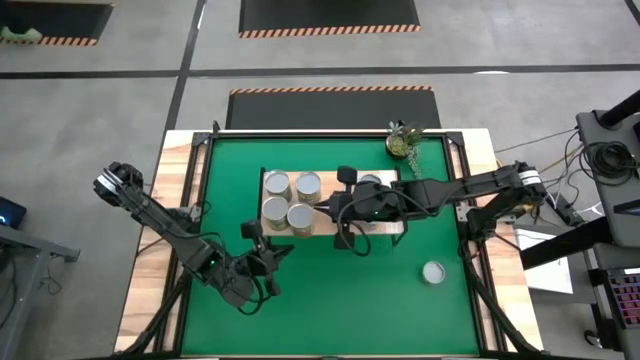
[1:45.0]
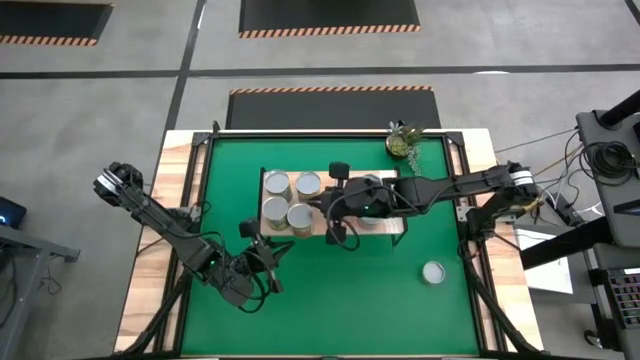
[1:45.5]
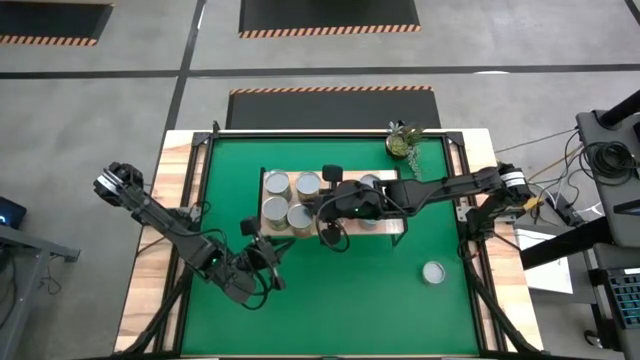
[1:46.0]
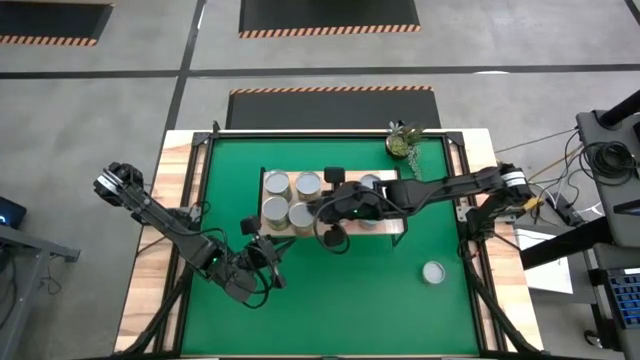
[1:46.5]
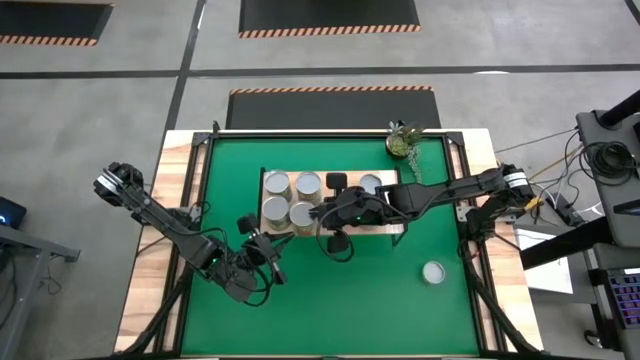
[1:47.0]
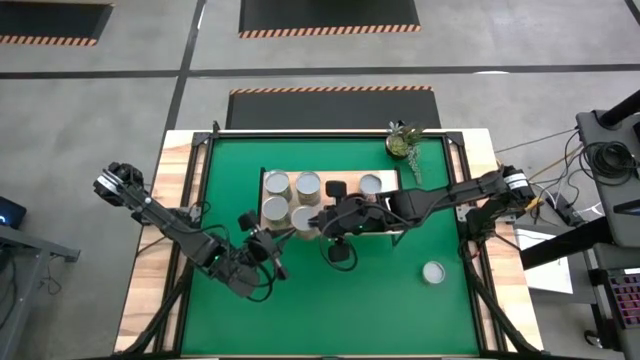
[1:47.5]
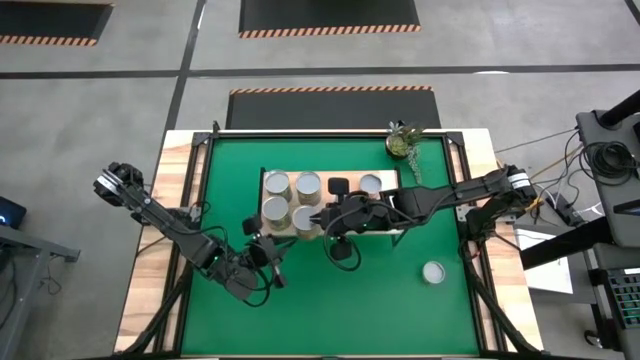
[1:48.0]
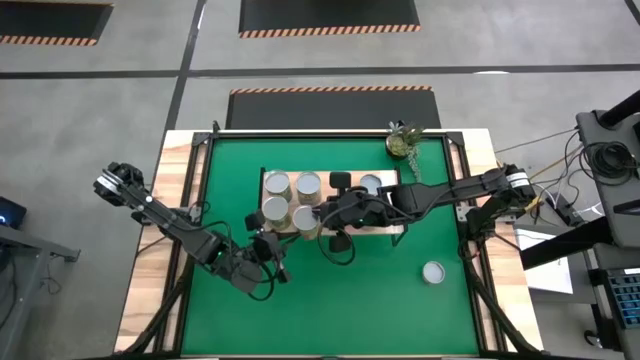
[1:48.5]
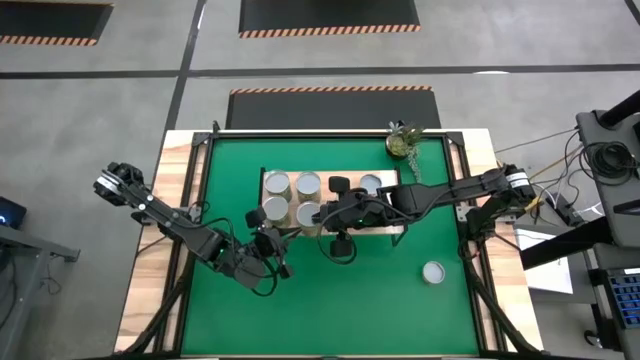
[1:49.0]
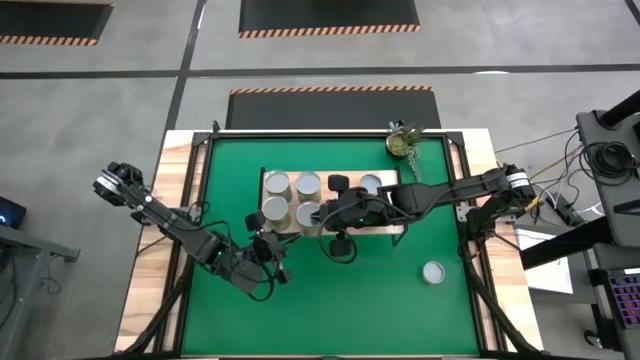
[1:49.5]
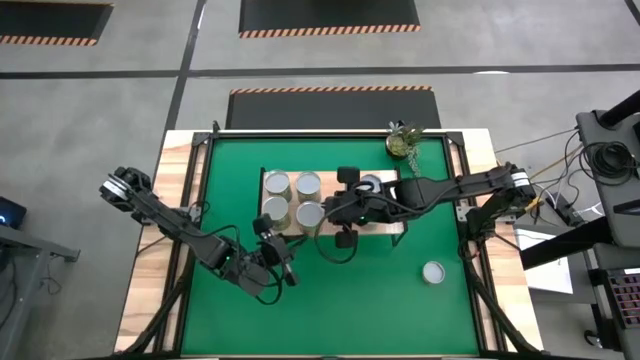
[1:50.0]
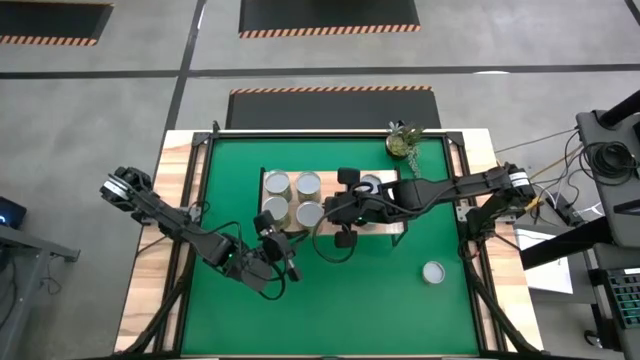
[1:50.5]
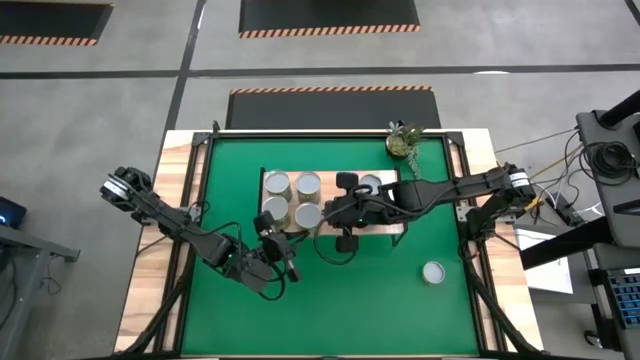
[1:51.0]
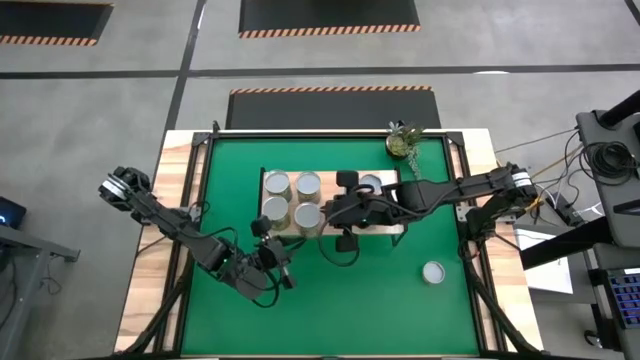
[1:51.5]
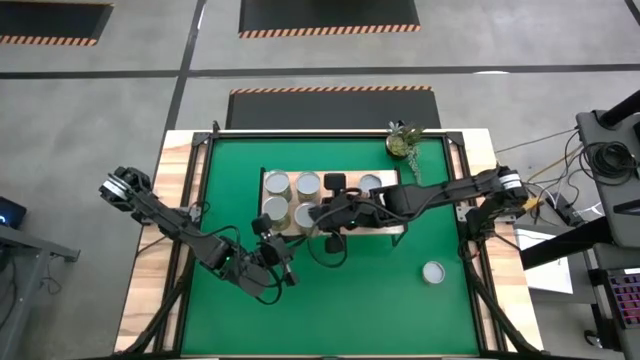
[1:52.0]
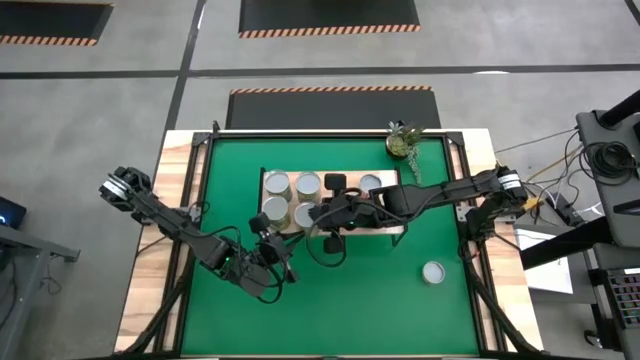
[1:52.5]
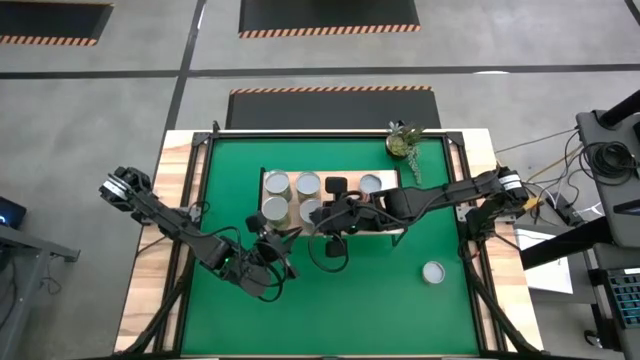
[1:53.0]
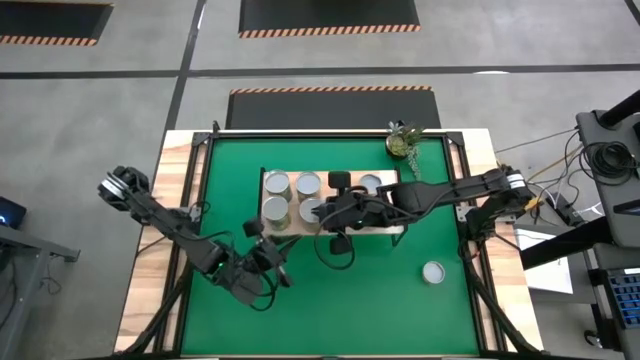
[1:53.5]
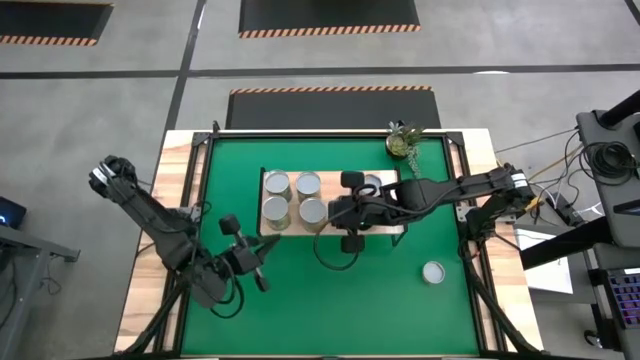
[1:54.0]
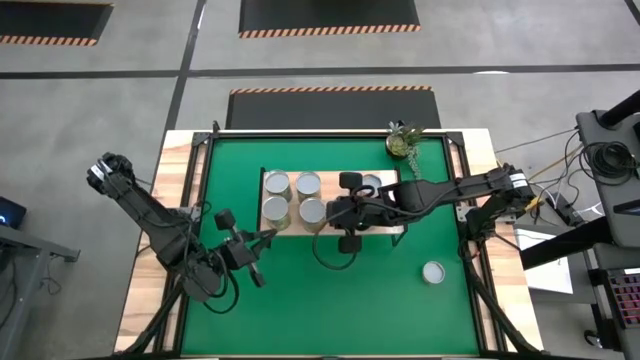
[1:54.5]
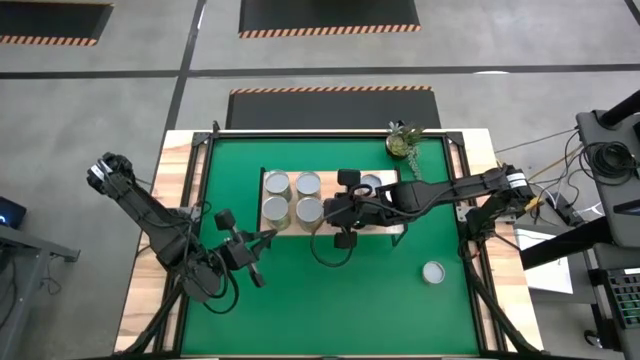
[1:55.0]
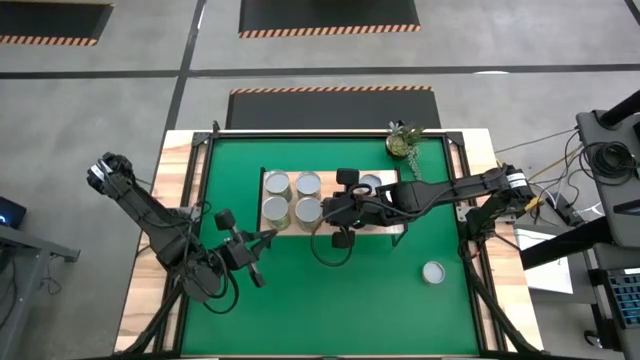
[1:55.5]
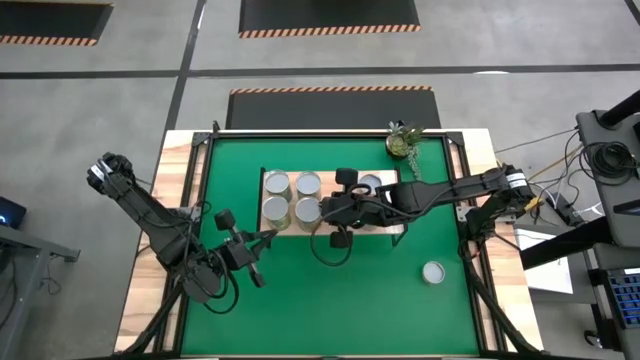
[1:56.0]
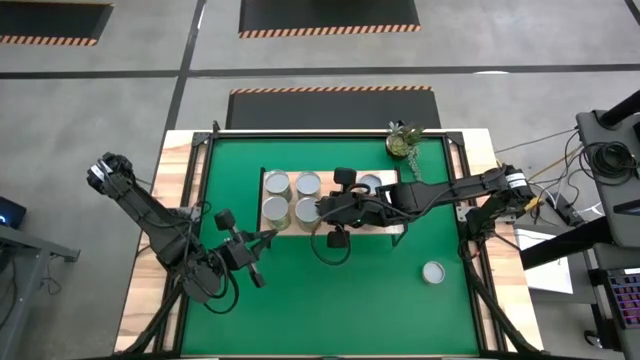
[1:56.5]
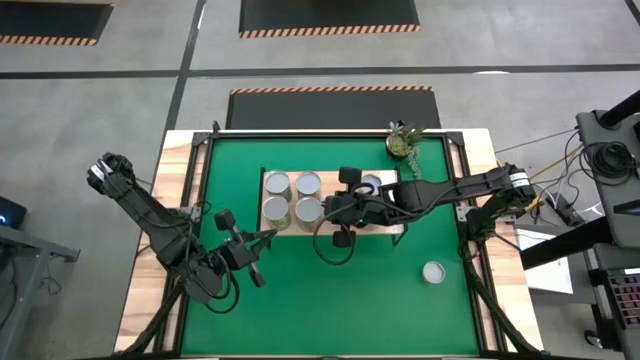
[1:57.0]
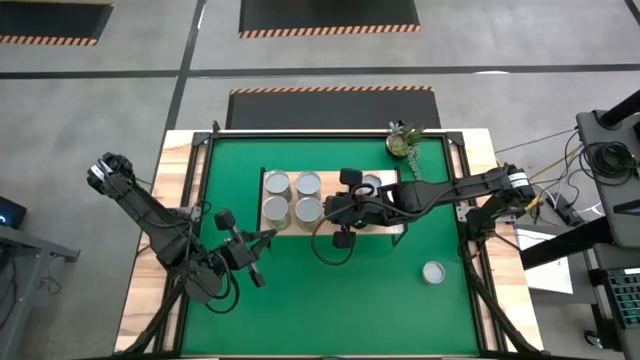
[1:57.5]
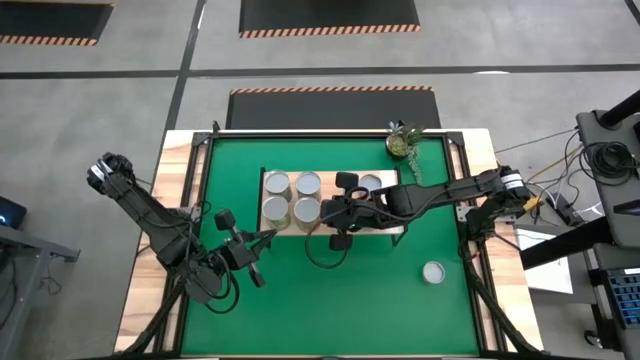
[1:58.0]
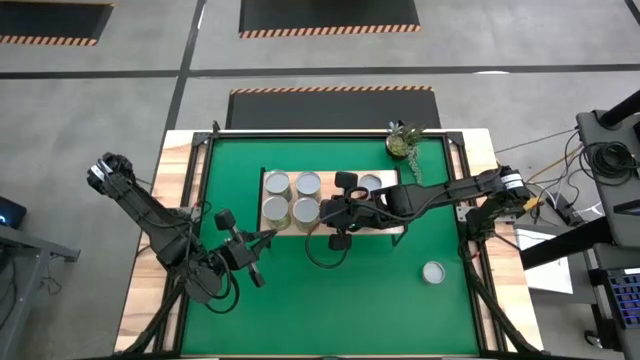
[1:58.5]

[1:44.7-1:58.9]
Task: Pick and place cans onto a shelf
Put the canned pineapple on the shelf

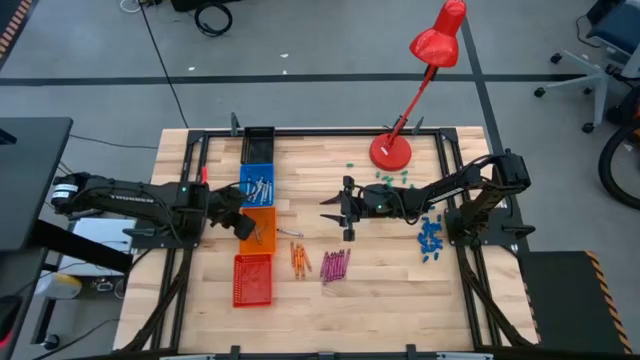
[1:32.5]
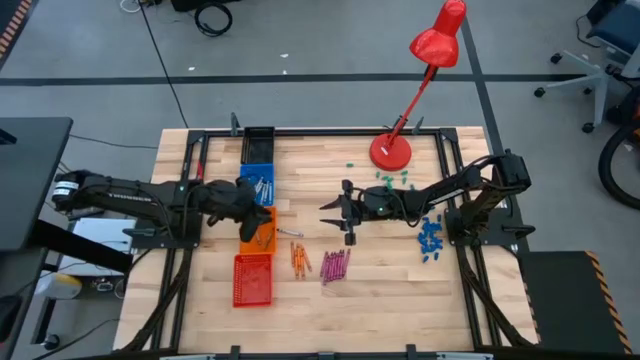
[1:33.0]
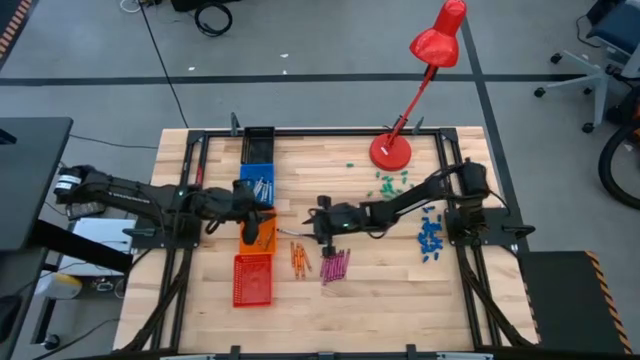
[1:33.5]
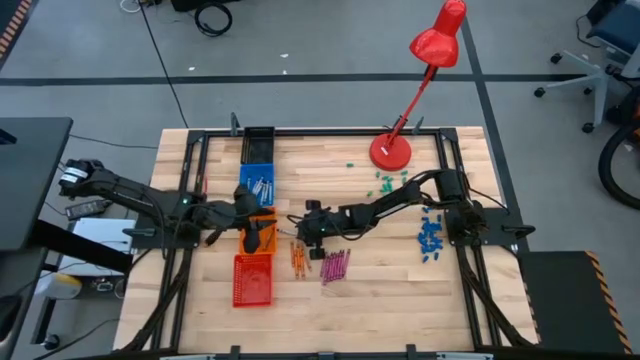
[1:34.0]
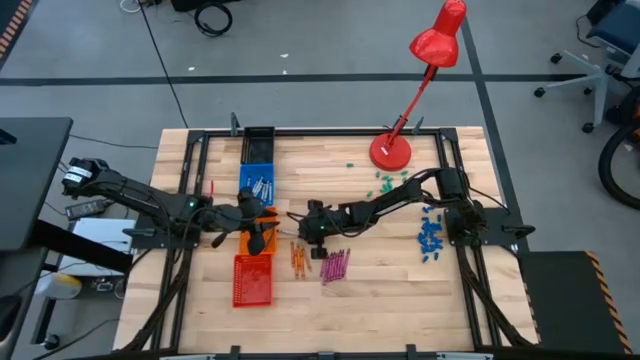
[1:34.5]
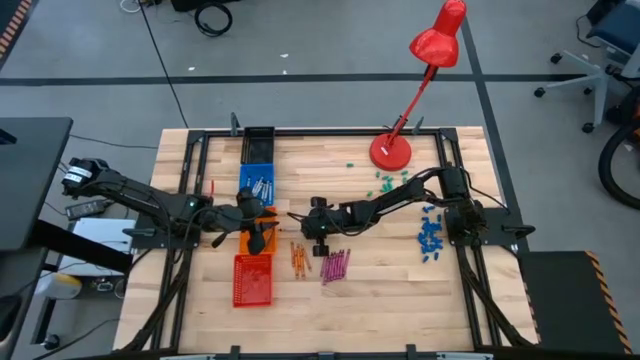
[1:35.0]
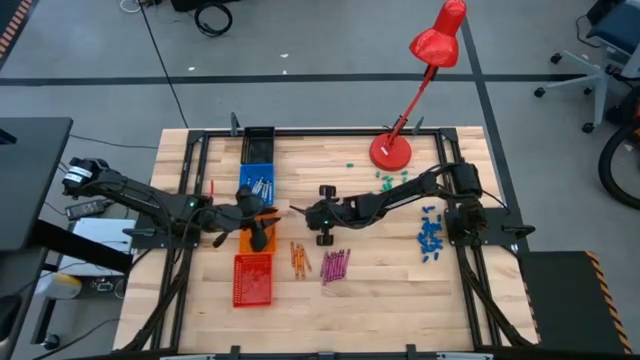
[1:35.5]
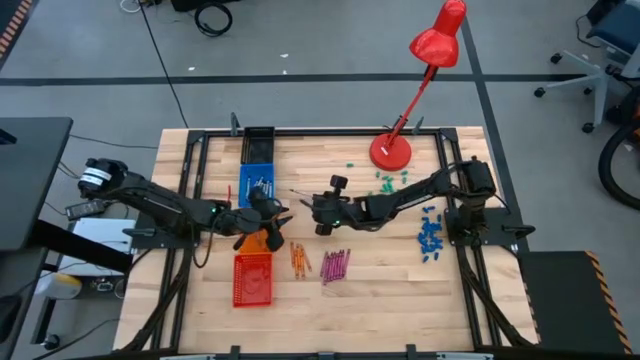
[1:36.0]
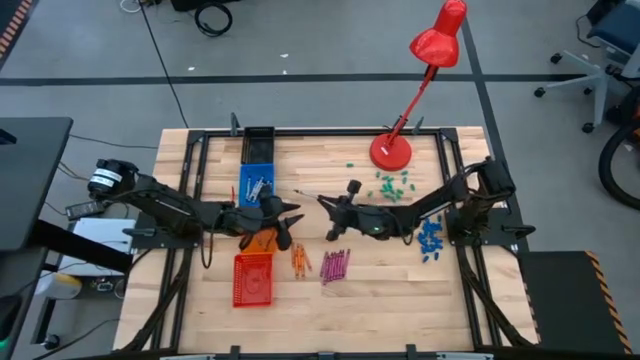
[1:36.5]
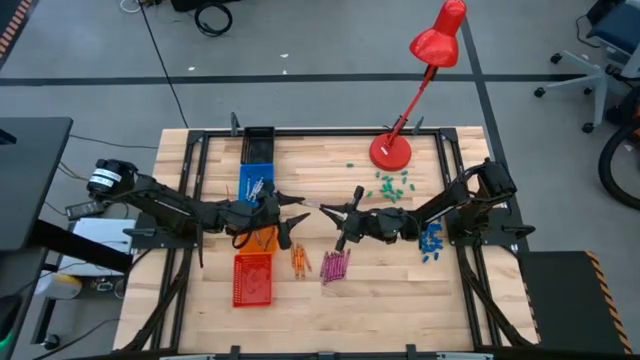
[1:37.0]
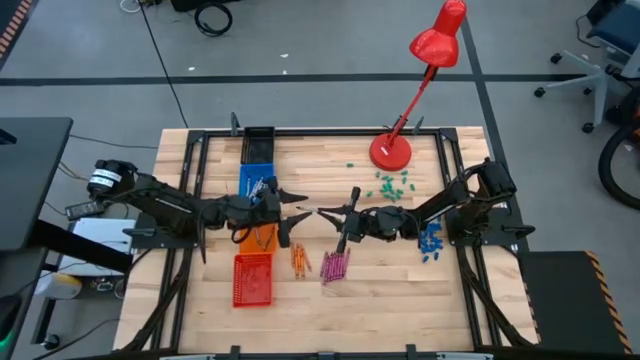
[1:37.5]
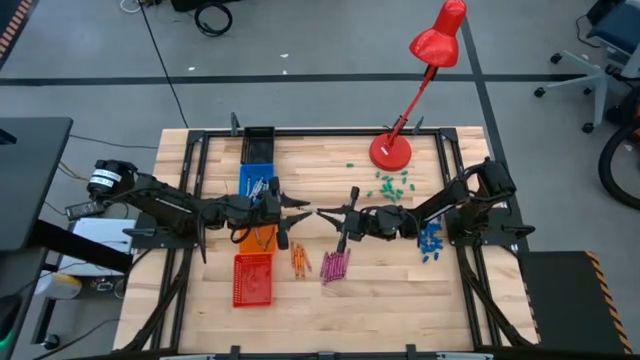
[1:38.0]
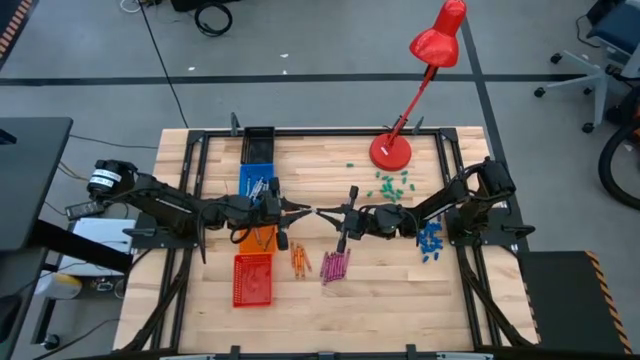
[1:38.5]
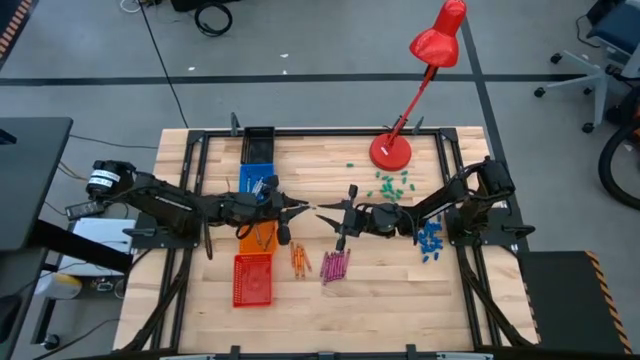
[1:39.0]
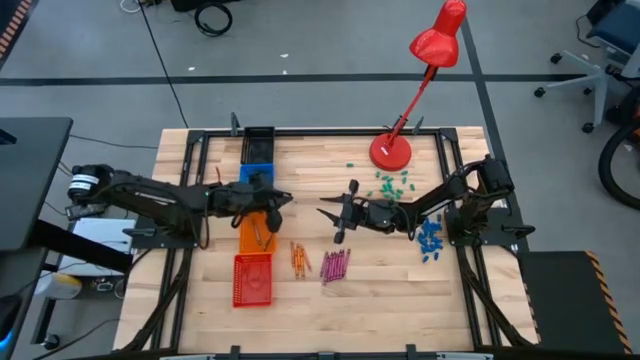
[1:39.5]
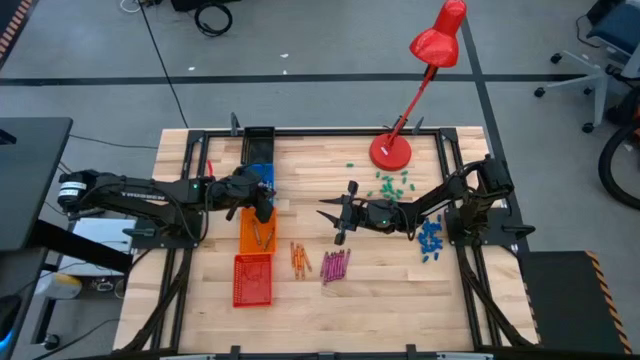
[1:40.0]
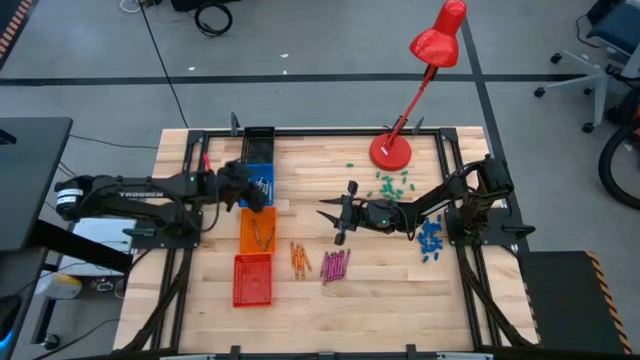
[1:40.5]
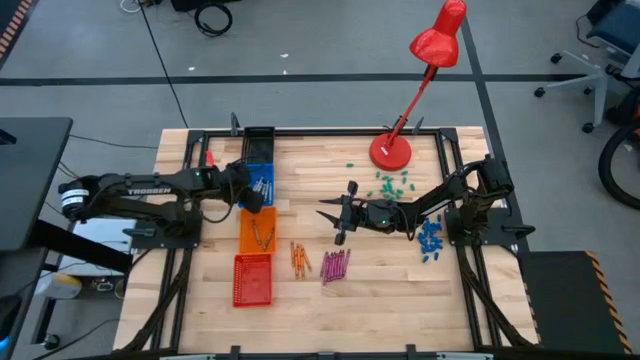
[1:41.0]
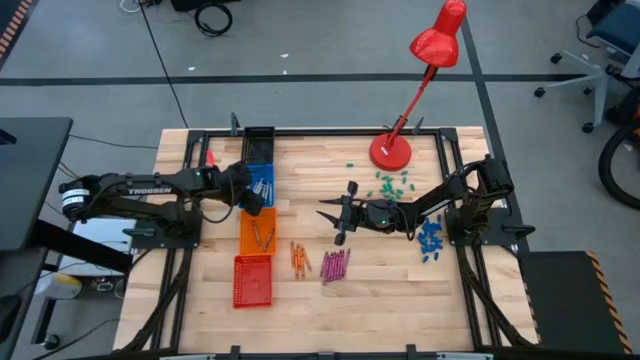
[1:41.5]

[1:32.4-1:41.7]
Task: Sort crayons
Put the black crayon into the blue bin
